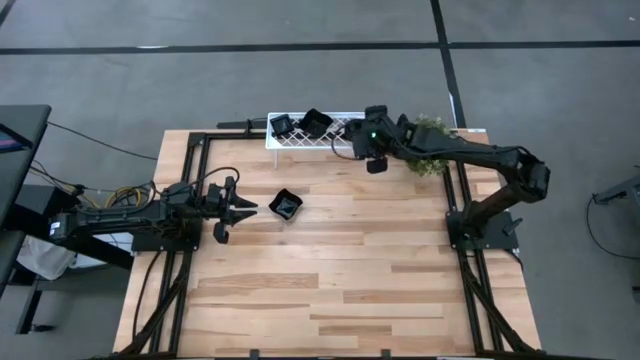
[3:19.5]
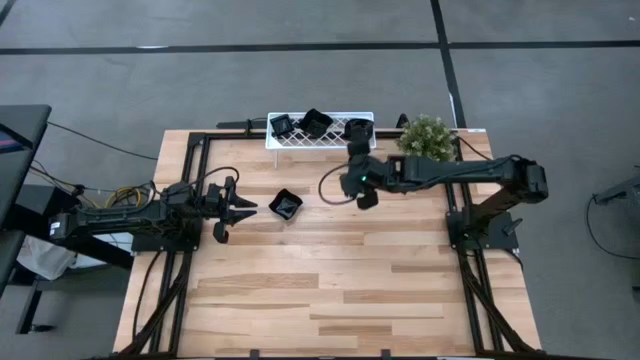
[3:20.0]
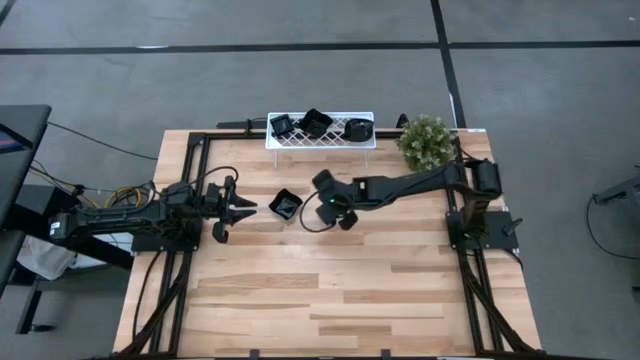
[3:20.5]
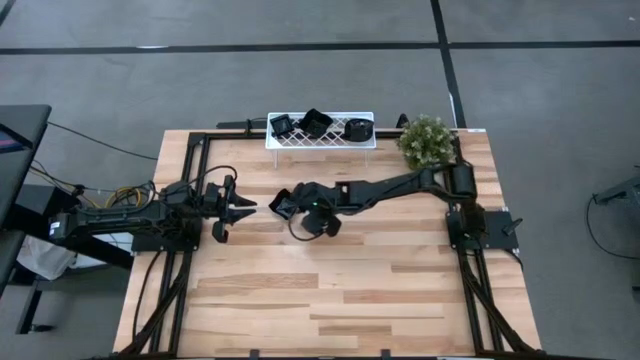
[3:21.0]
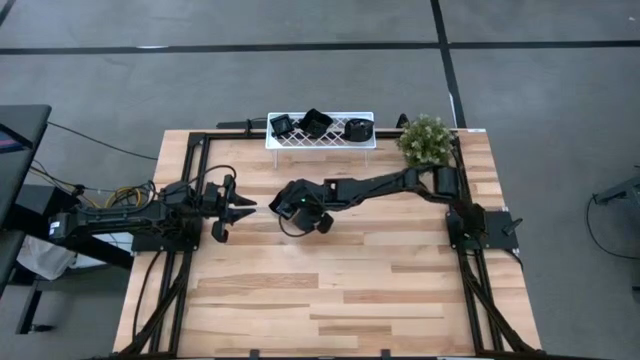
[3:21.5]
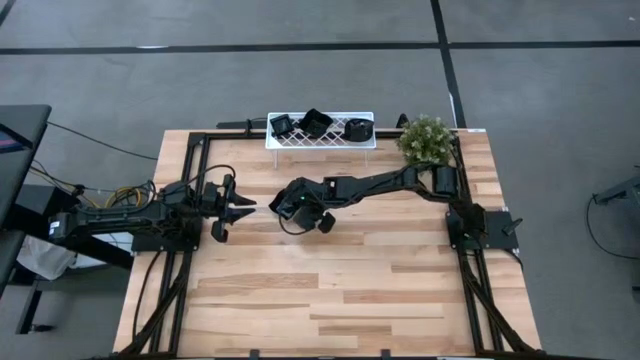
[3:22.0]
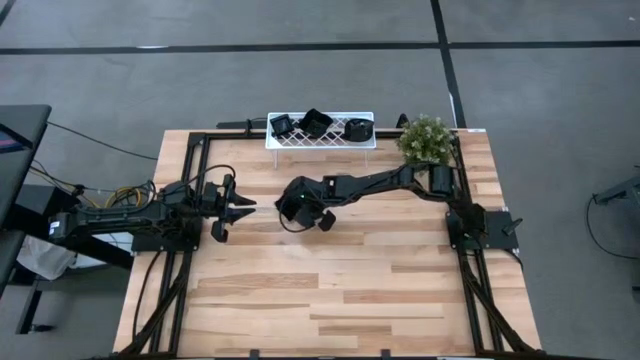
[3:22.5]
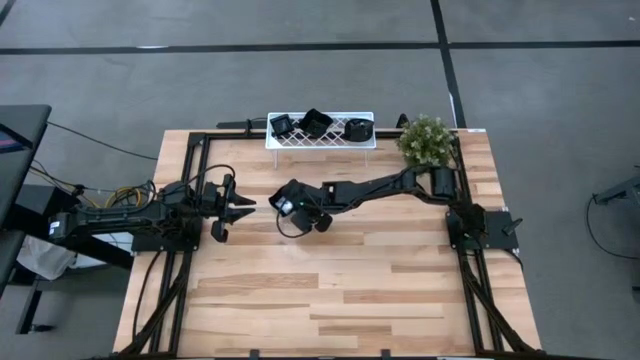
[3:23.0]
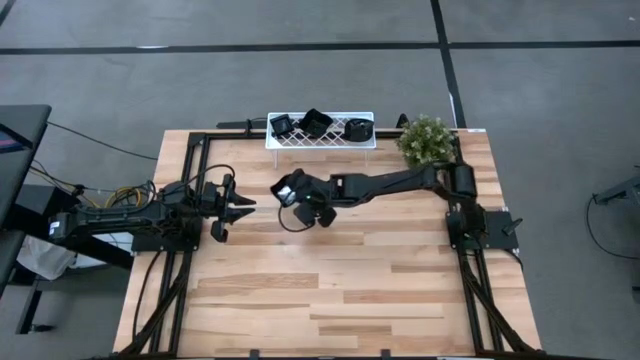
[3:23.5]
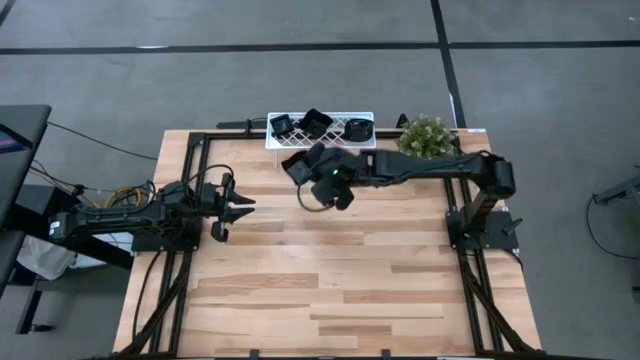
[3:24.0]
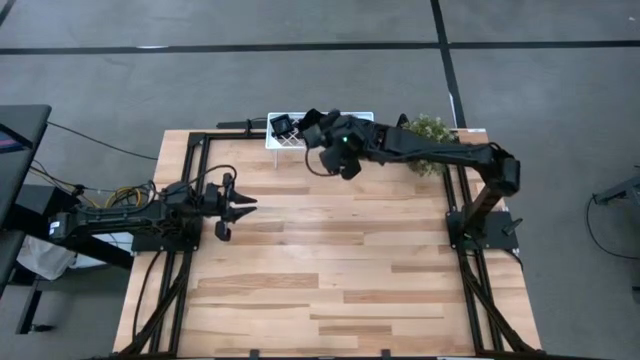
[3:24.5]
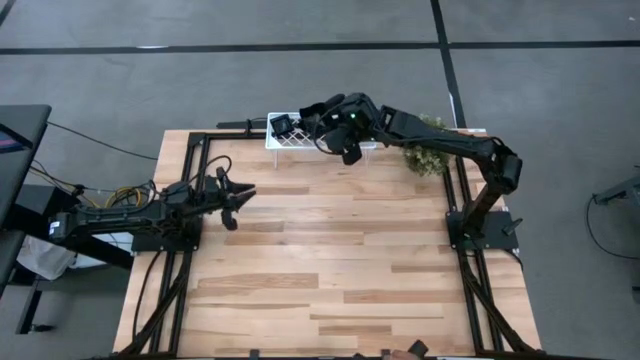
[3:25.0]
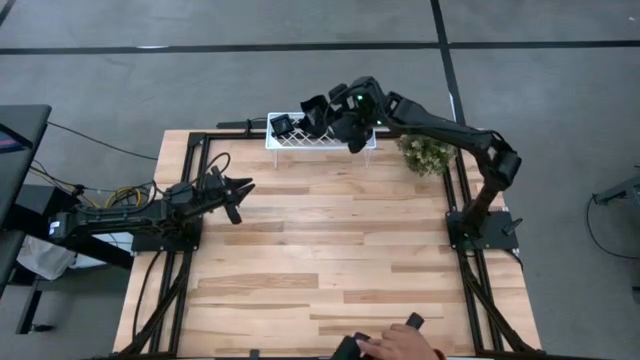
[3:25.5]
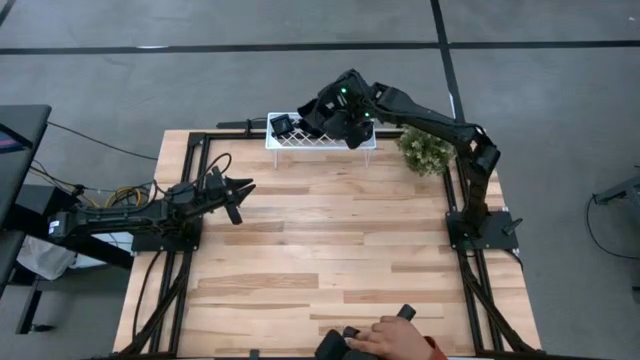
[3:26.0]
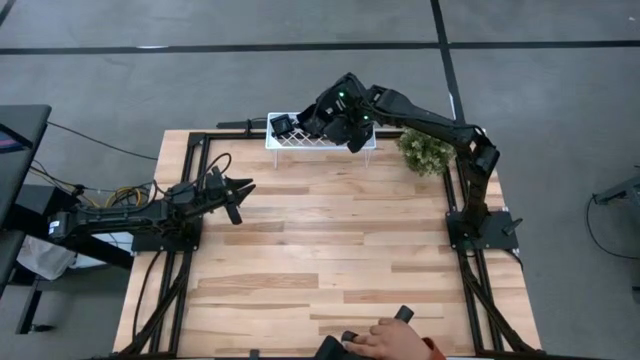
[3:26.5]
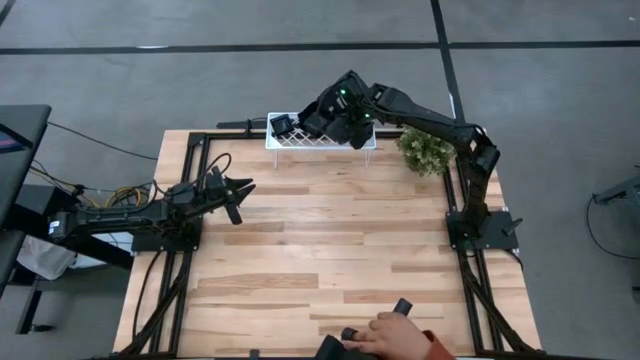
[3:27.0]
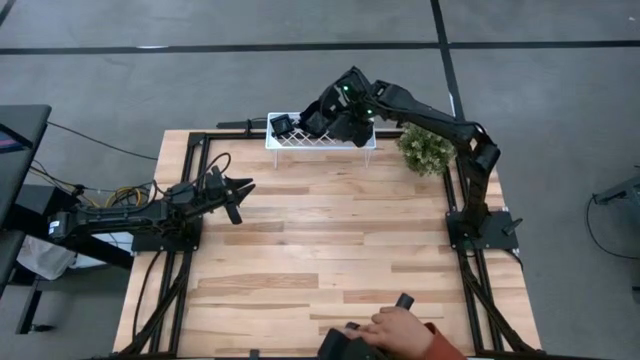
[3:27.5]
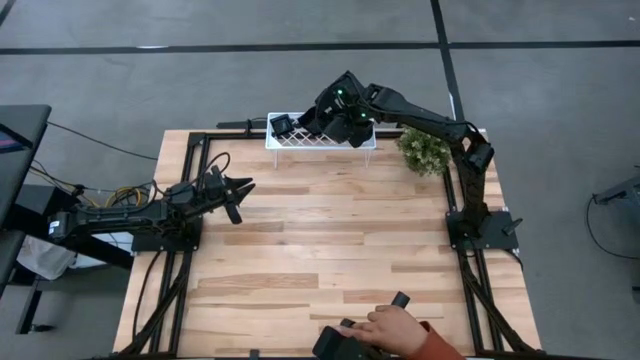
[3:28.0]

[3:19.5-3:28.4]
Task: Pick & Place Mini shaped plates
Stack the black distorted square plate on top of the black distorted square plate on the shelf

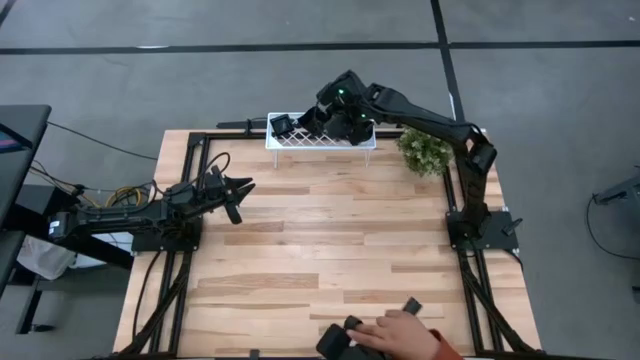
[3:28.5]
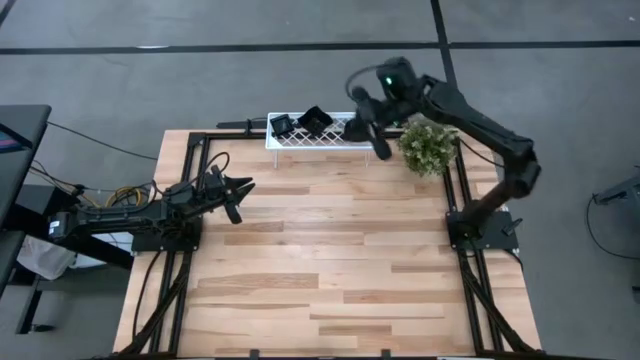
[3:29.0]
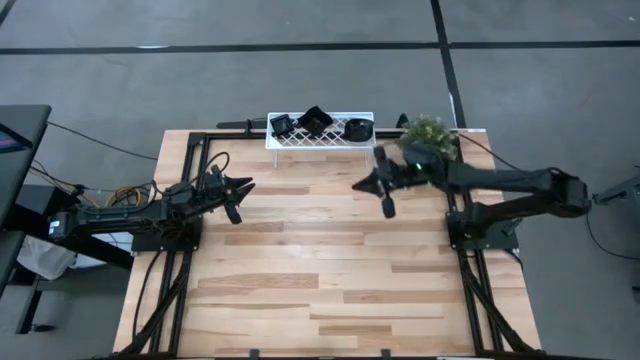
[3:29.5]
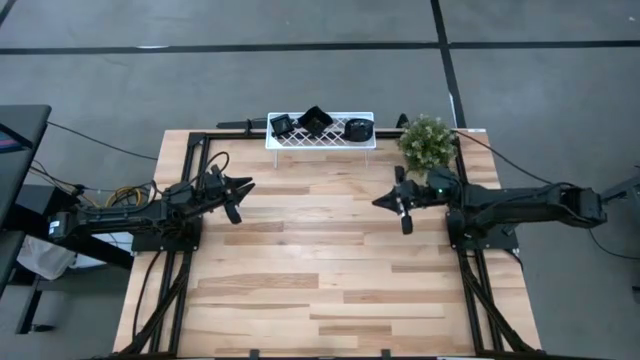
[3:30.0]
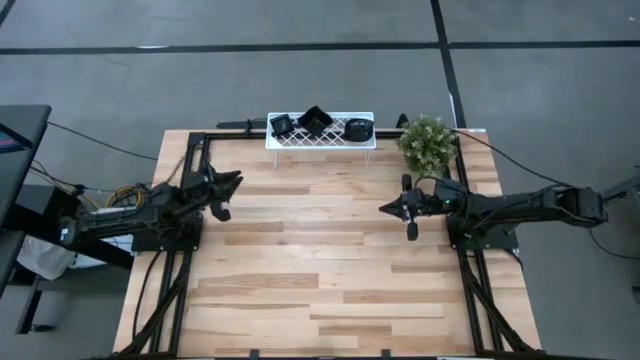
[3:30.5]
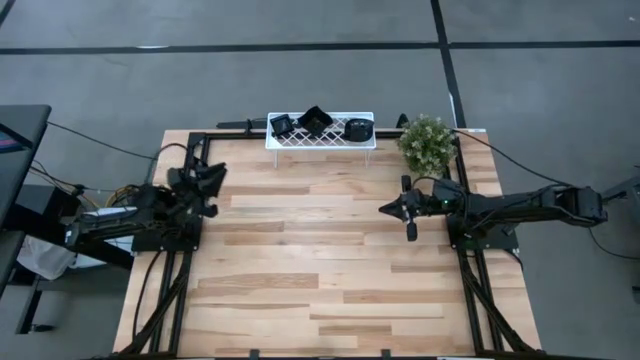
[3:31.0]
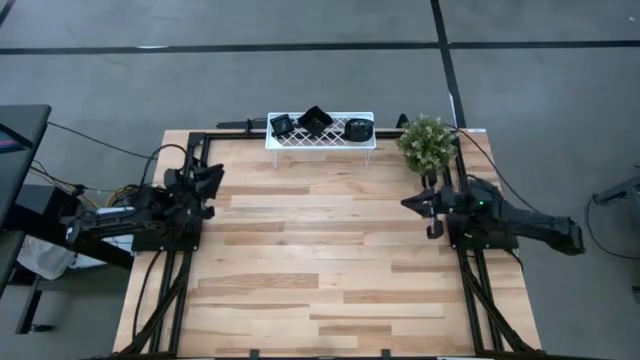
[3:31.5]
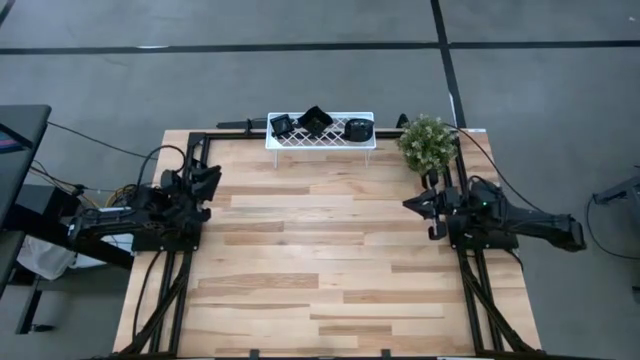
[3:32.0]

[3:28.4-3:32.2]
Return to Home Position

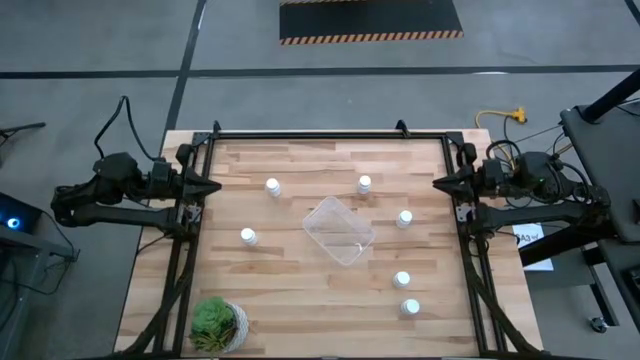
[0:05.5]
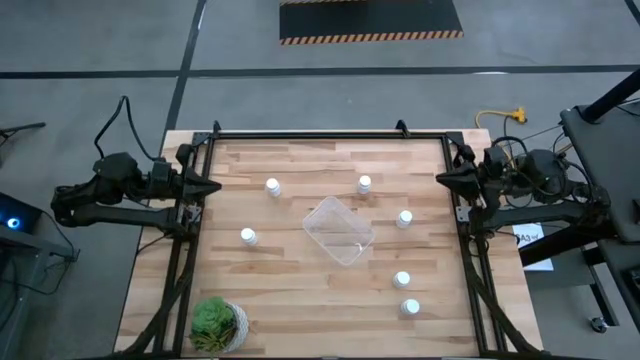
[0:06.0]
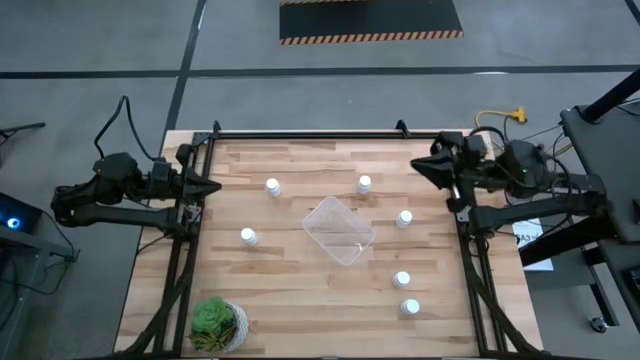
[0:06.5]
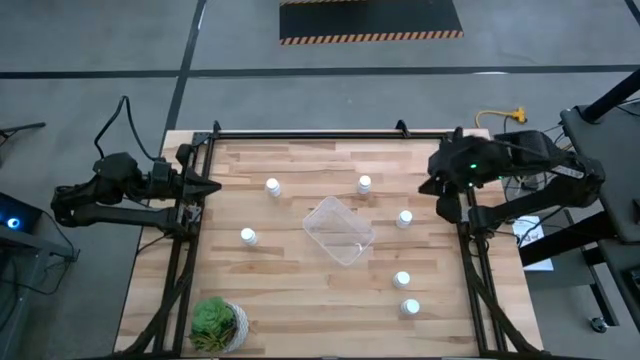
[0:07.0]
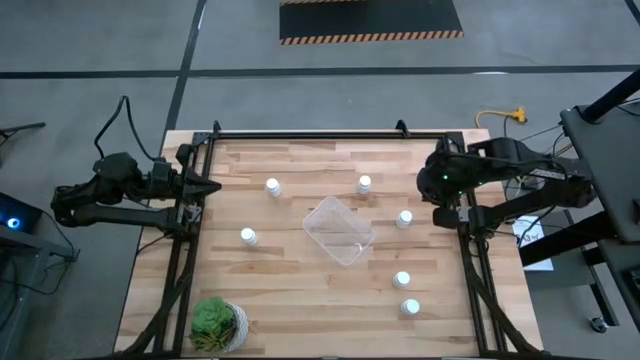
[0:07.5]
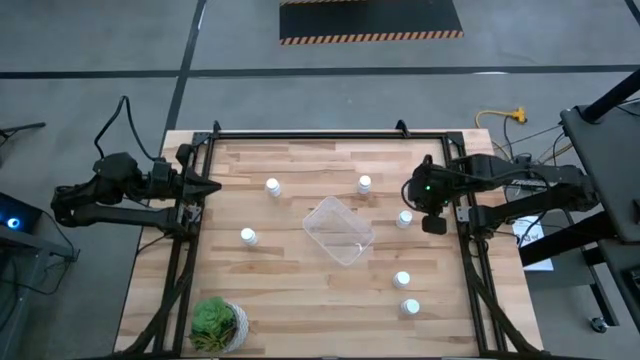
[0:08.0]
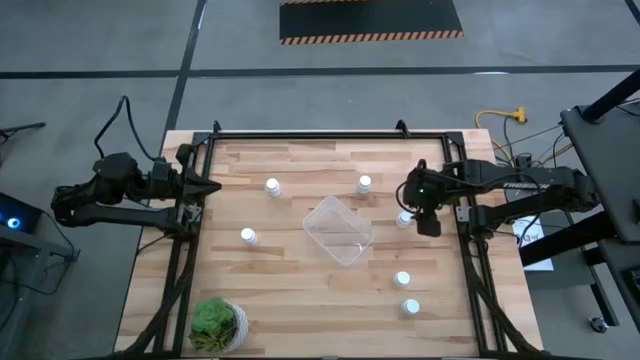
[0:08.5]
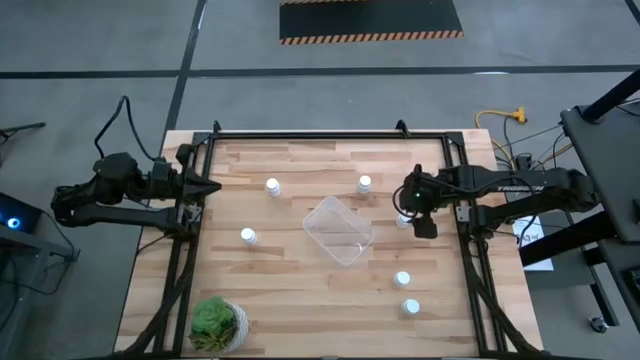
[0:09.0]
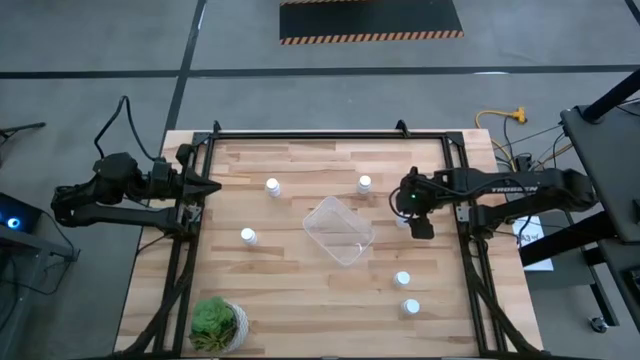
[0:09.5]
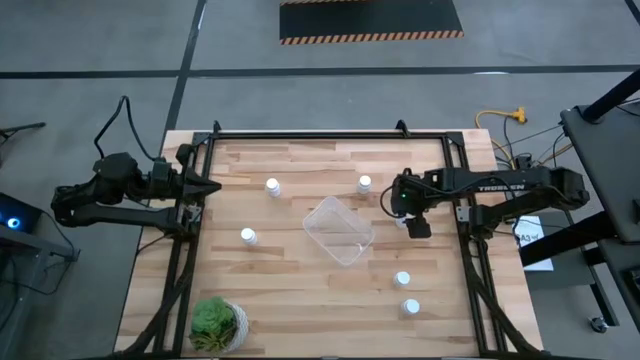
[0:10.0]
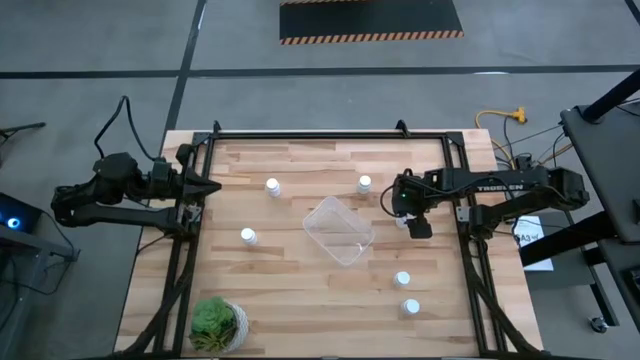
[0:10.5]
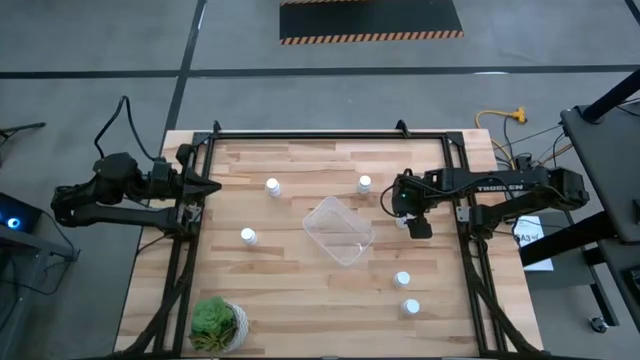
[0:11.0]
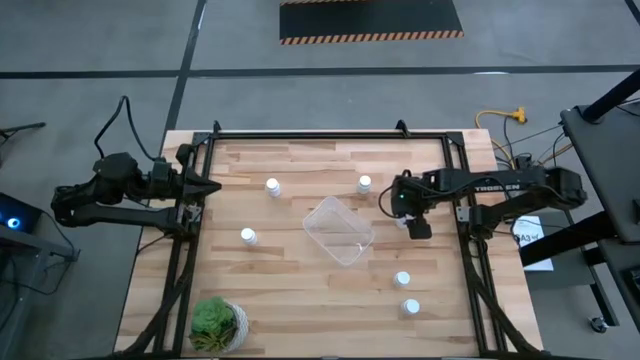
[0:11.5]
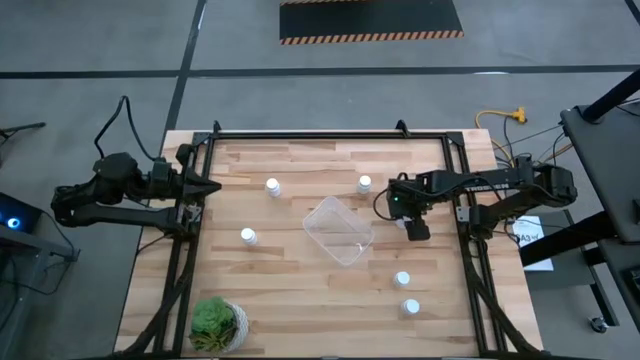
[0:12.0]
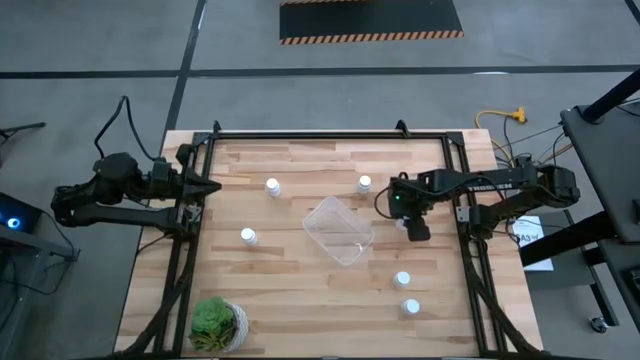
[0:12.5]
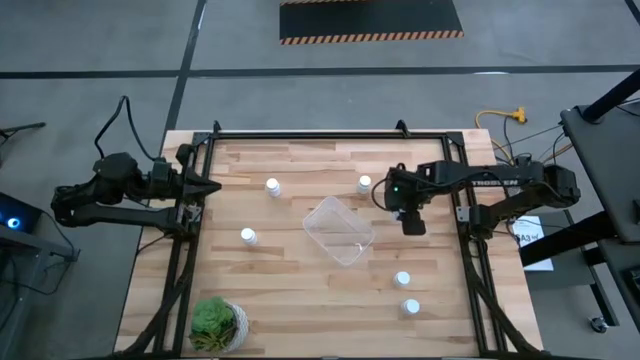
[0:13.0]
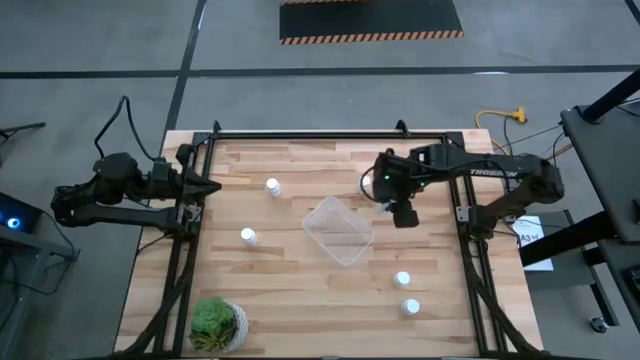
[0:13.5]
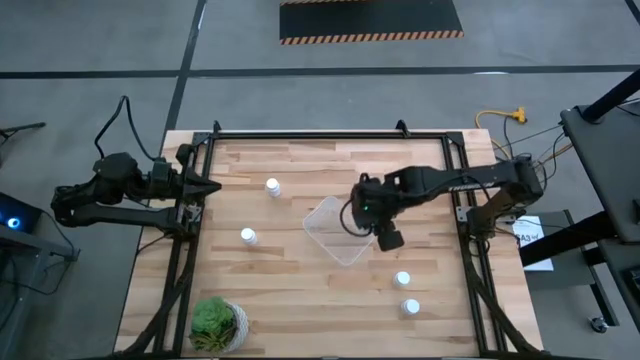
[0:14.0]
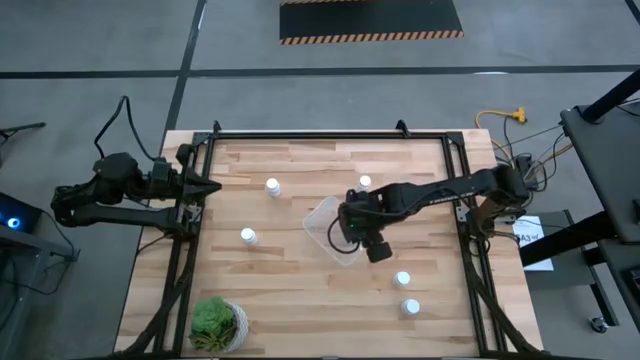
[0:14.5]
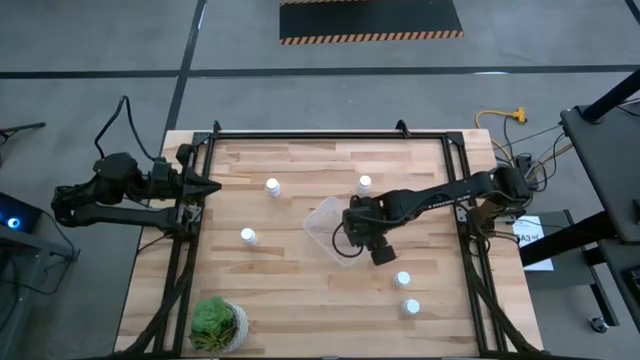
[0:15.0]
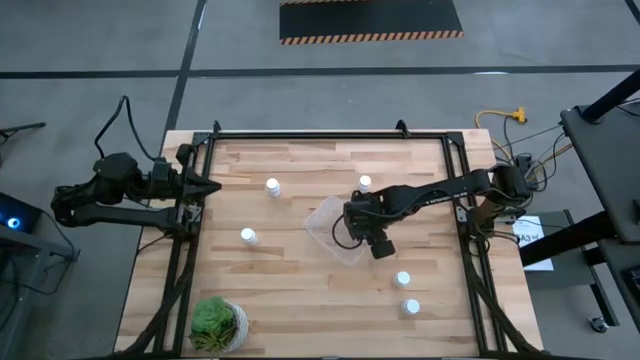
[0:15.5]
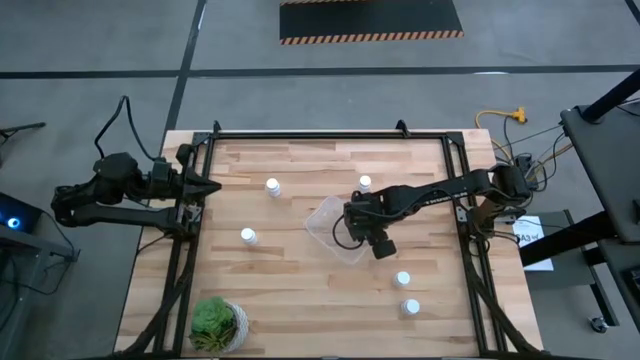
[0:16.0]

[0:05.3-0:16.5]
Task: Pick and place pill bottles into a basket
Put the white pill bottle into the transparent bin
